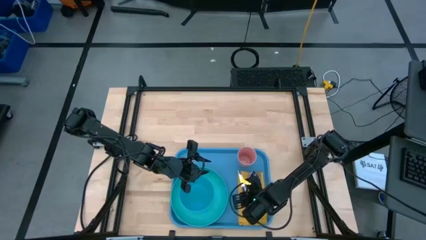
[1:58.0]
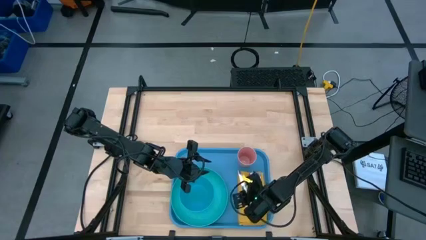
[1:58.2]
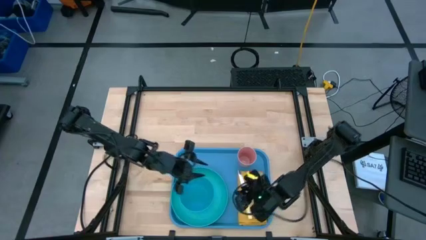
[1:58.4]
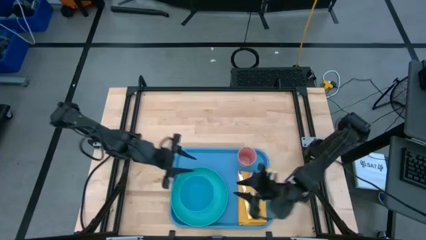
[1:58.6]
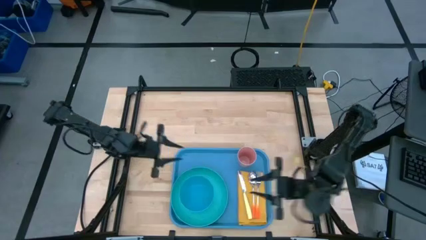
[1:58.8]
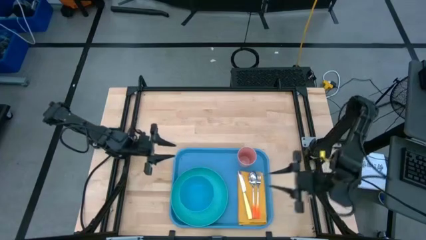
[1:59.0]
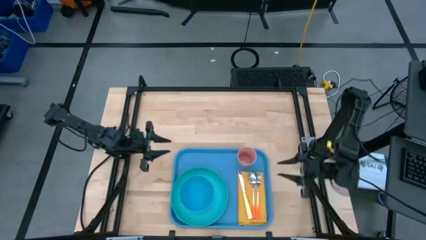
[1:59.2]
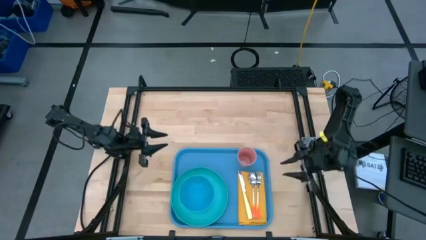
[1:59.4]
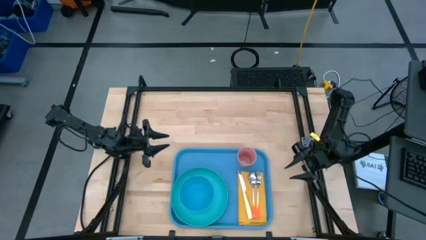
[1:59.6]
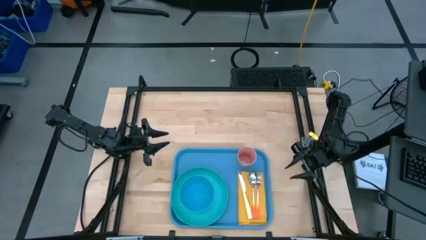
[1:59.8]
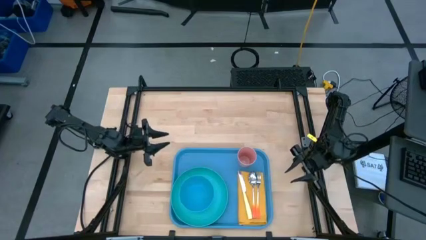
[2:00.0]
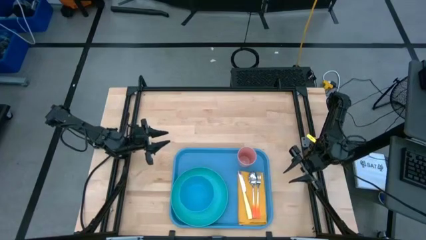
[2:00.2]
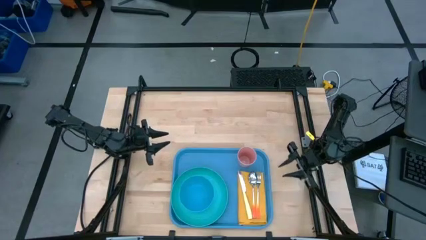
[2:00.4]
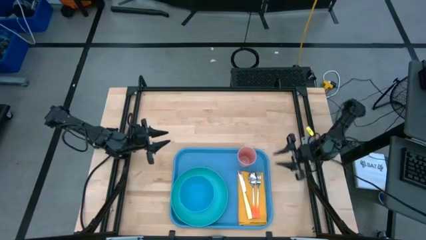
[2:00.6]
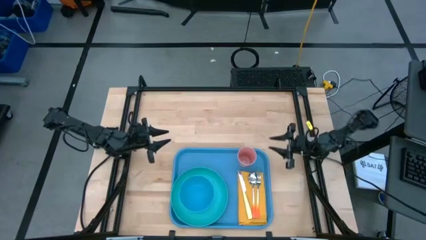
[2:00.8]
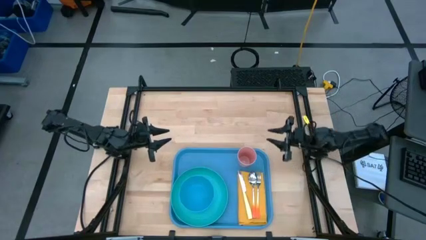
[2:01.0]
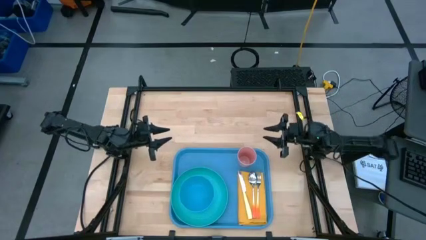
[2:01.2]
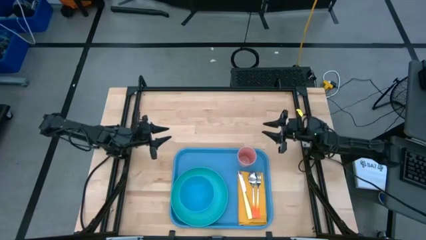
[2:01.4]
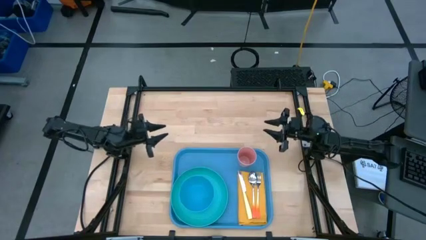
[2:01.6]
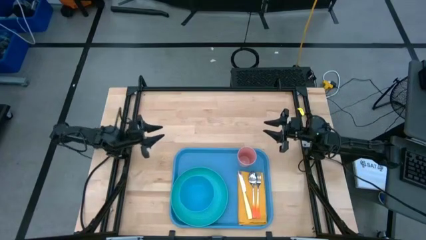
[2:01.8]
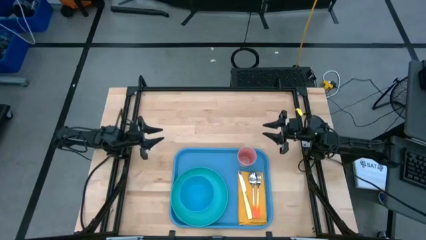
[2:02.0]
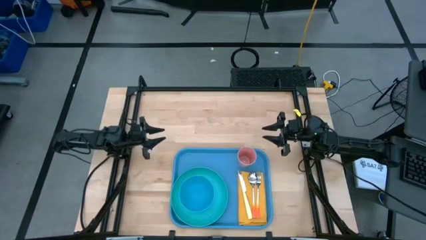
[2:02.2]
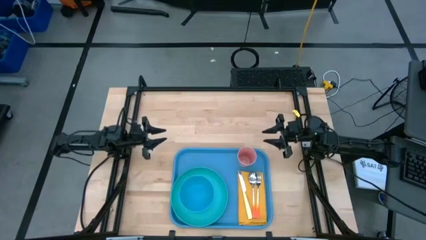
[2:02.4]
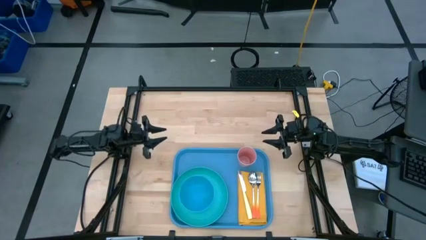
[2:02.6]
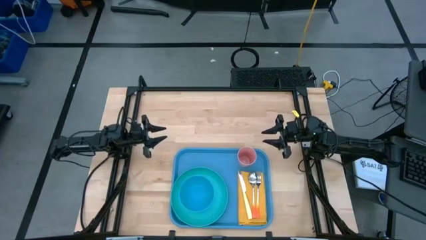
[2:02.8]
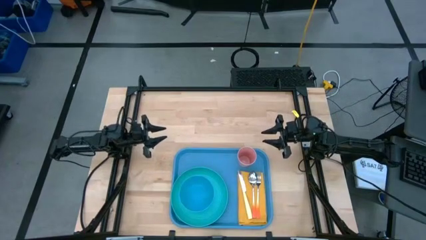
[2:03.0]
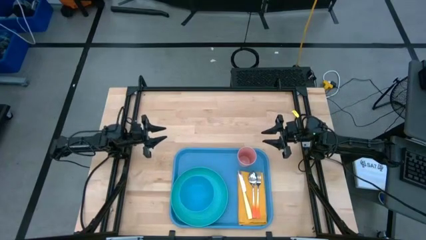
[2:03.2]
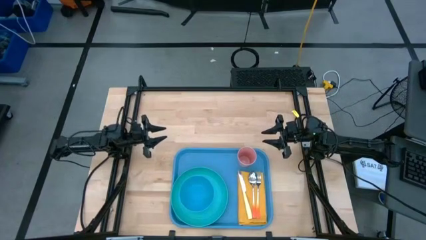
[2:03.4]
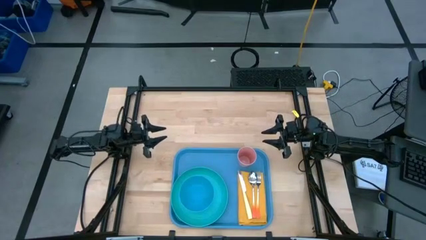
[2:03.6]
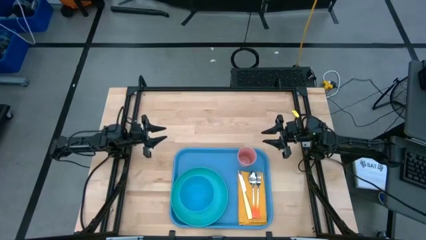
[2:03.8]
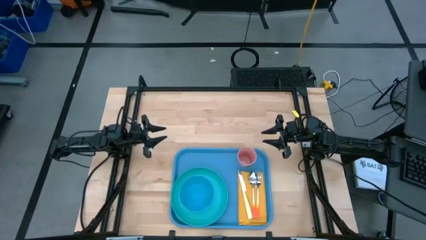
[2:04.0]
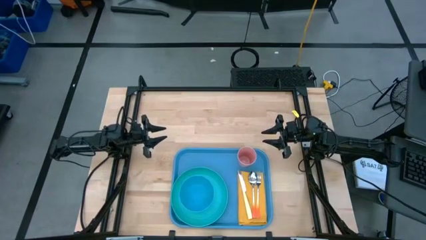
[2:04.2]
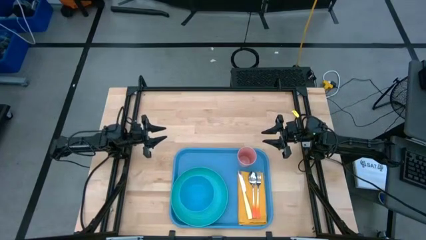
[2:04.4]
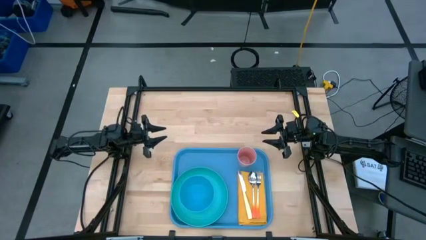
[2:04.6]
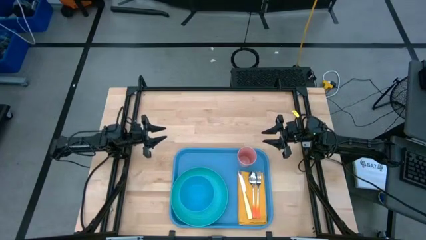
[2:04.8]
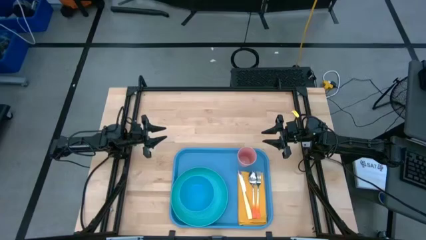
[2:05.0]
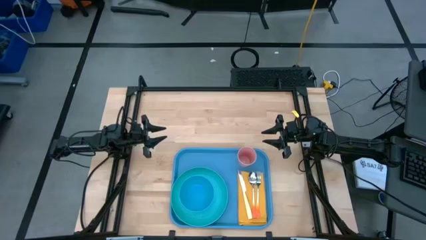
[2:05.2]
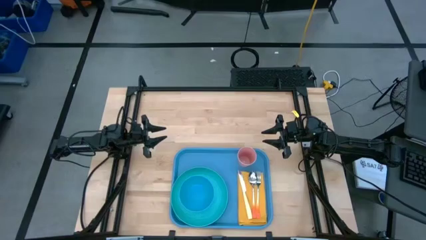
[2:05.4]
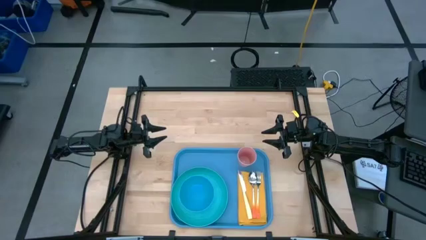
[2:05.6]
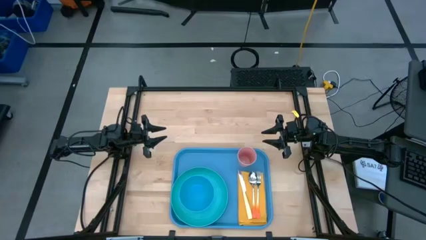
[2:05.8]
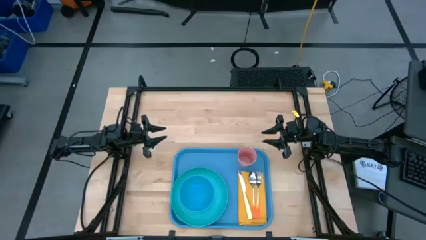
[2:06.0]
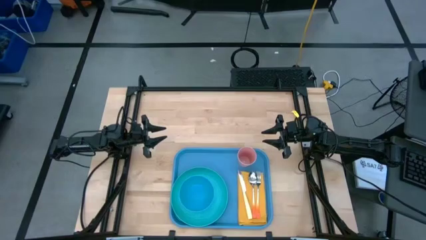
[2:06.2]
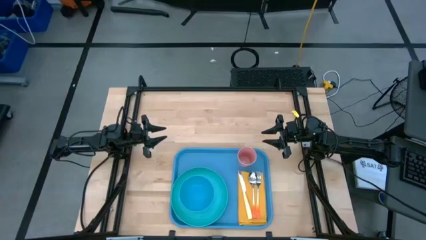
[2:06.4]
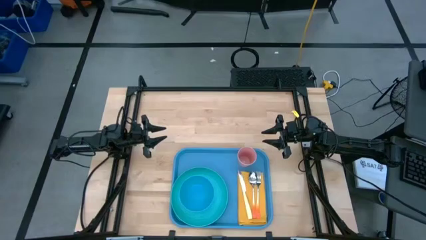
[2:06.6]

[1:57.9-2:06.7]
Task: Set up tray
Return to Home Position

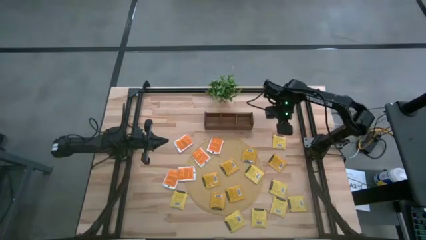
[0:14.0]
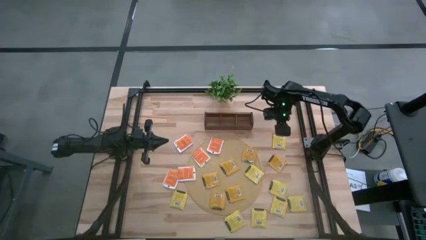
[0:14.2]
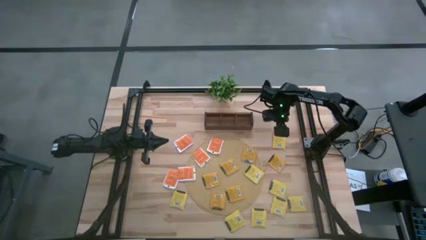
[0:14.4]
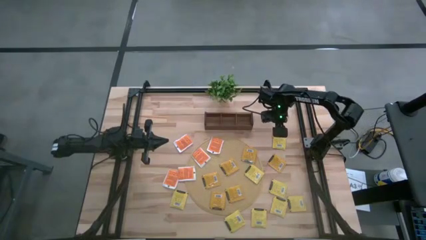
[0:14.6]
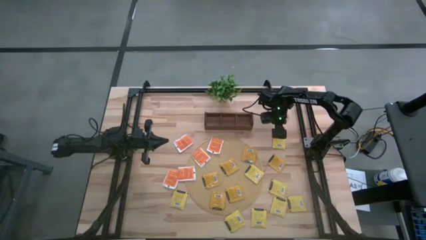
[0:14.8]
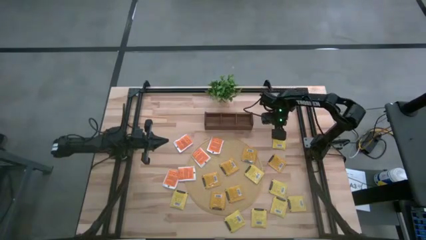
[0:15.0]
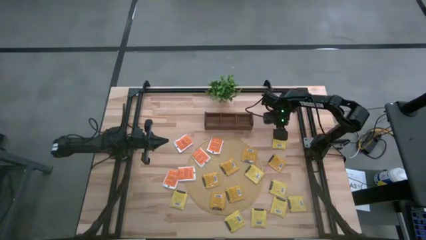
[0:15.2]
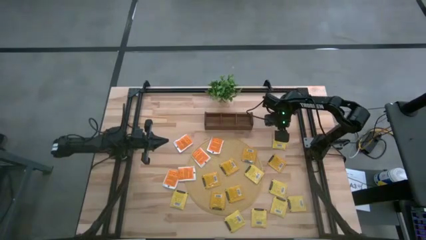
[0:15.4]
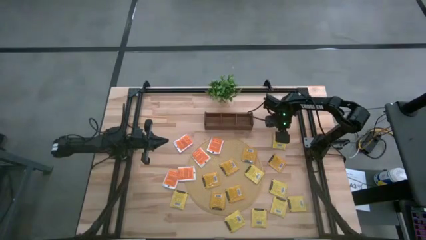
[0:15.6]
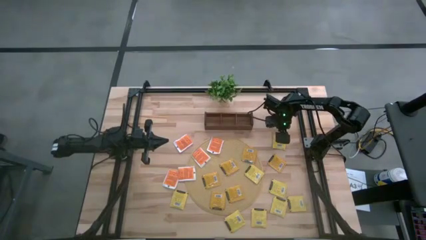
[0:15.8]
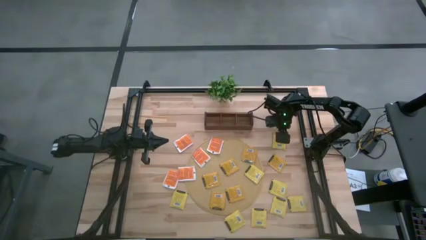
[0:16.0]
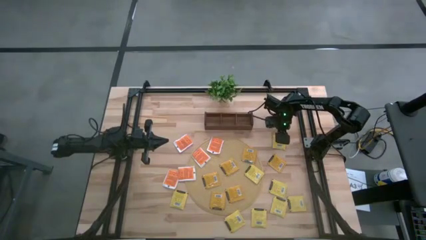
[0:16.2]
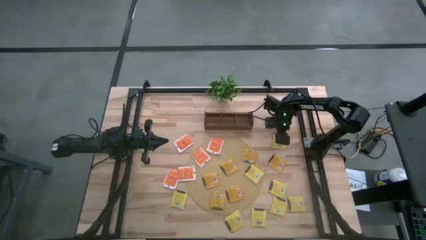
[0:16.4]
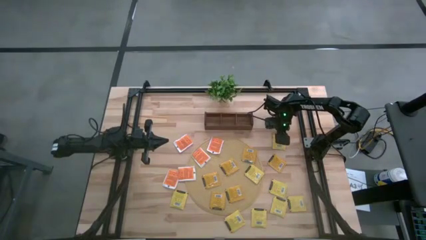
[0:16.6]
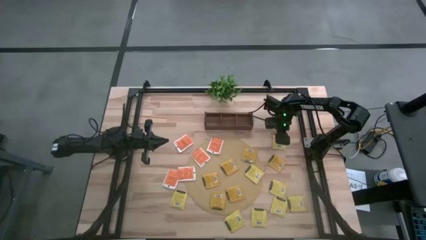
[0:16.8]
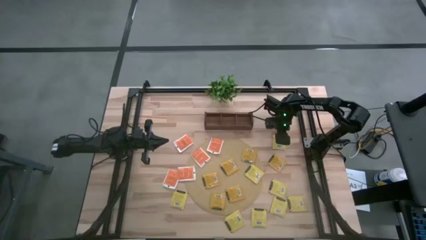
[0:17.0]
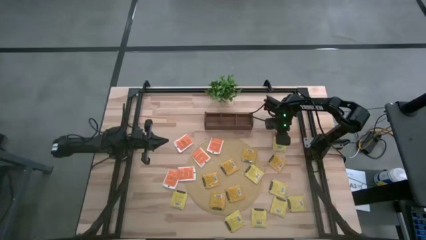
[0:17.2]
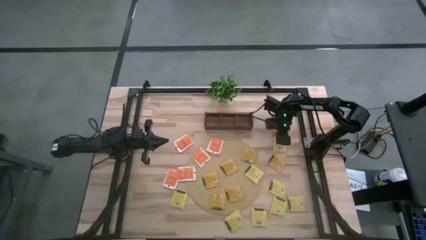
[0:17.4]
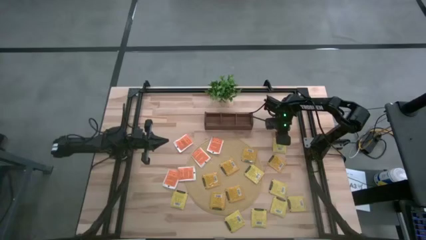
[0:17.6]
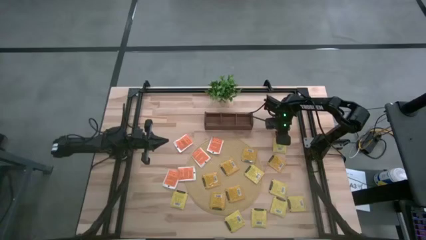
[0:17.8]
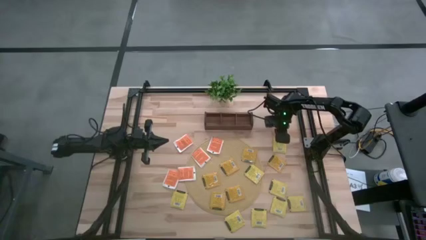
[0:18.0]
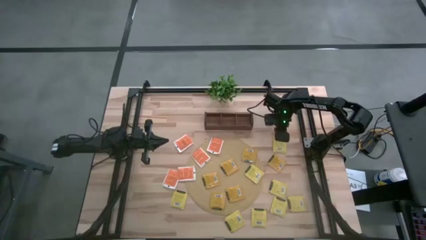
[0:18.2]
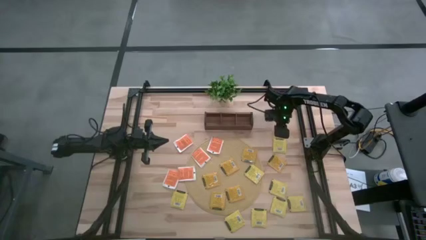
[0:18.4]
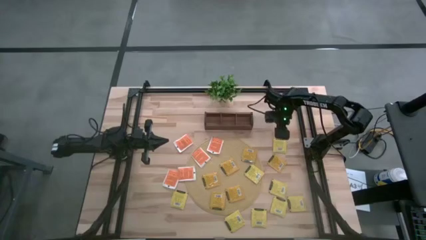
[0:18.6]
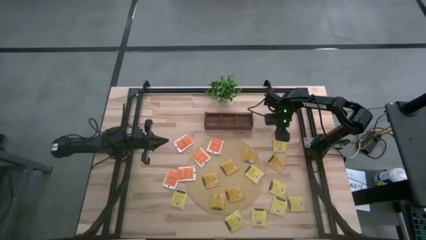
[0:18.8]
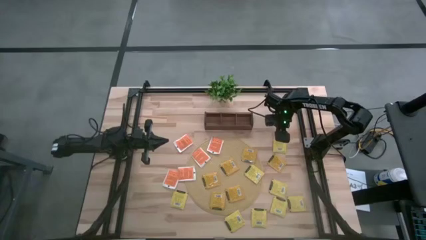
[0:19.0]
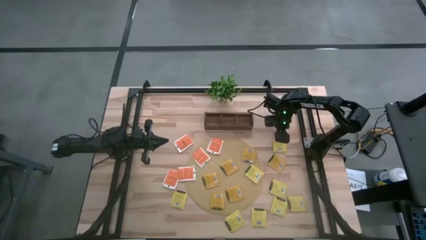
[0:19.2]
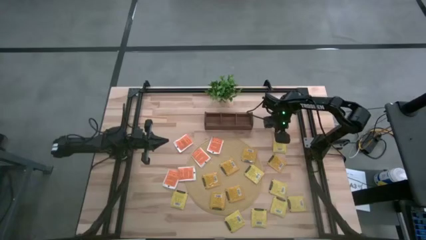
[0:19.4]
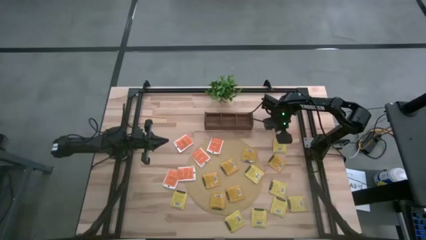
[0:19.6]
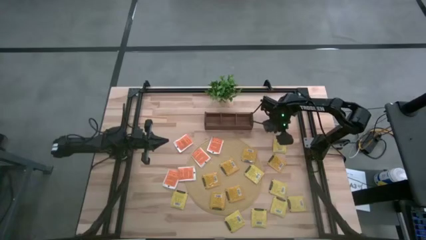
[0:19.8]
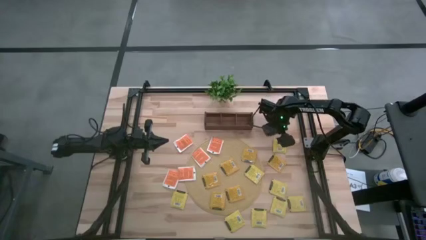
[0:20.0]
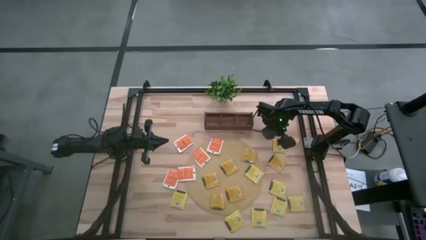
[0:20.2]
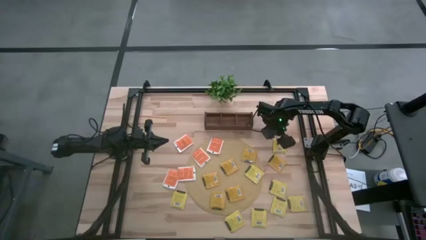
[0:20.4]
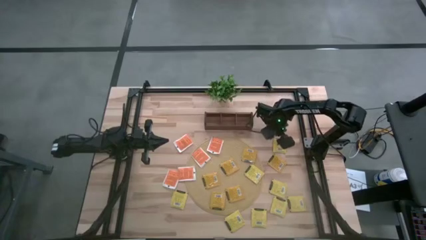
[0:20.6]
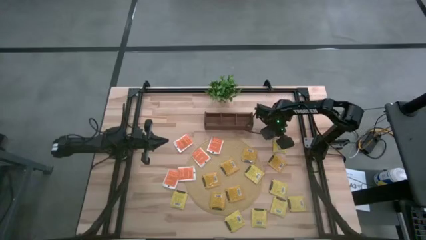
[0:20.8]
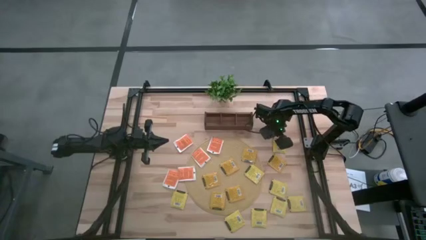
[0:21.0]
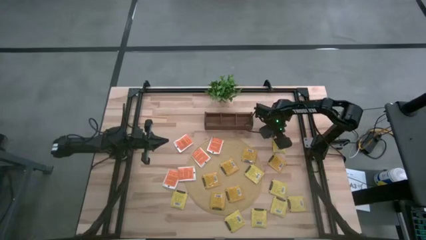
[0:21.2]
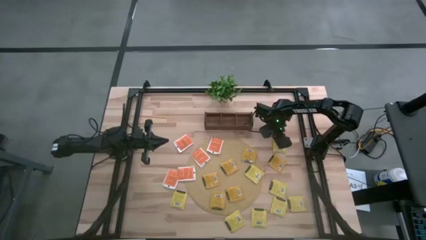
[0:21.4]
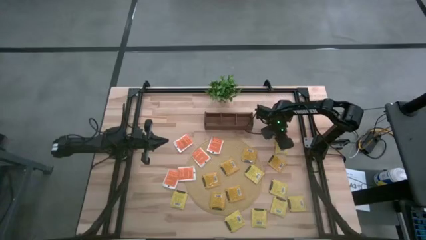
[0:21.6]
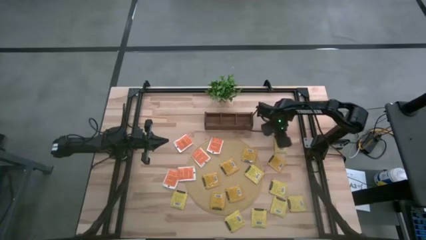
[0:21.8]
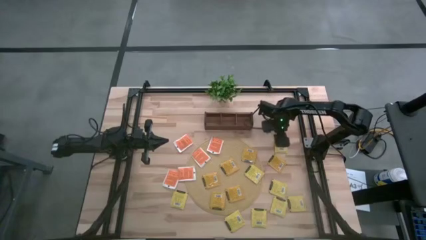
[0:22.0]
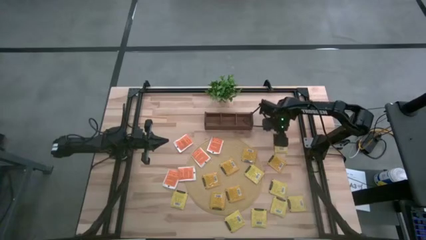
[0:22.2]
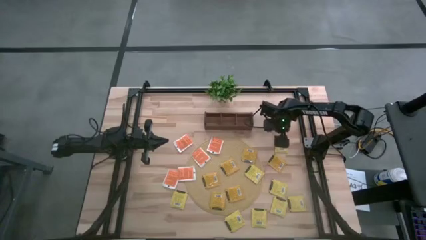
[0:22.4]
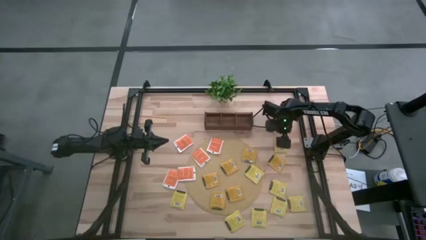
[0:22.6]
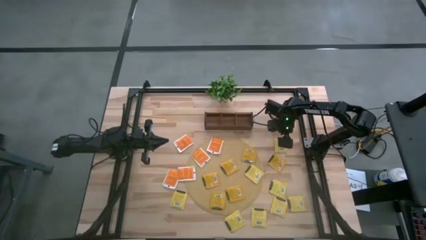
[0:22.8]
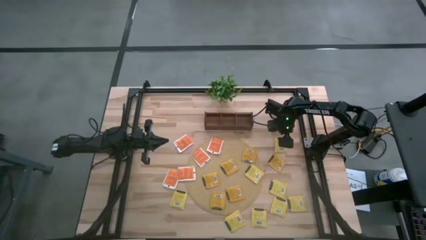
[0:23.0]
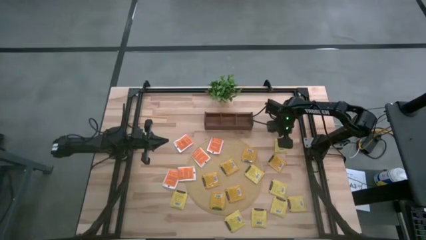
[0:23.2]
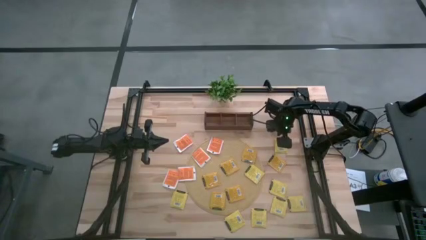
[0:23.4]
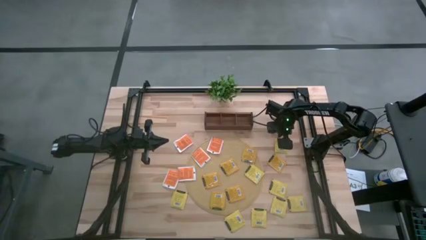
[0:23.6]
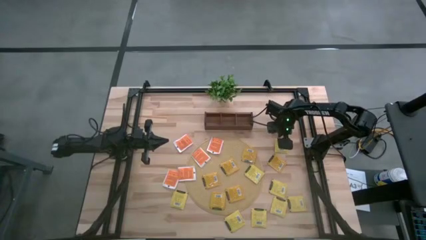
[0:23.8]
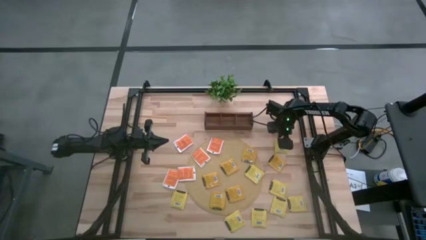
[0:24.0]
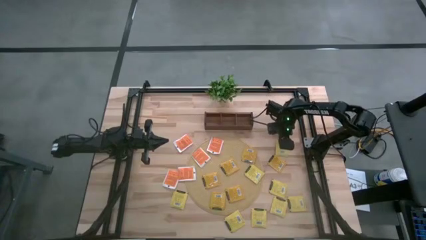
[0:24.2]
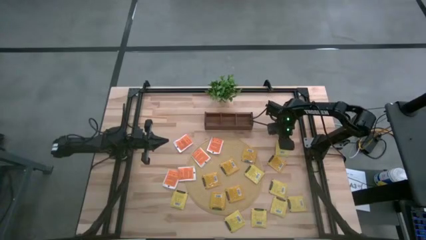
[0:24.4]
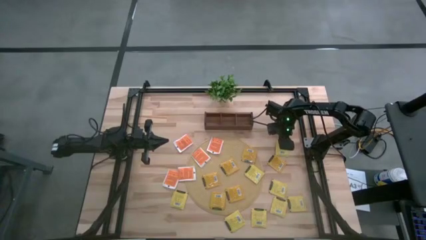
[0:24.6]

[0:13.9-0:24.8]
Task: Pick & Place Tea
Put the yellow tea bag into the right section of the wooden organizer
